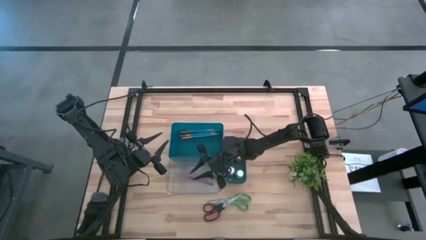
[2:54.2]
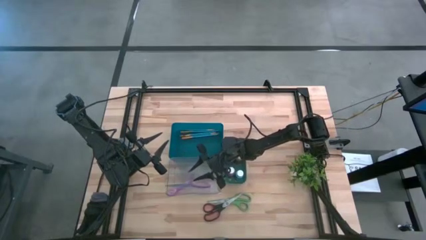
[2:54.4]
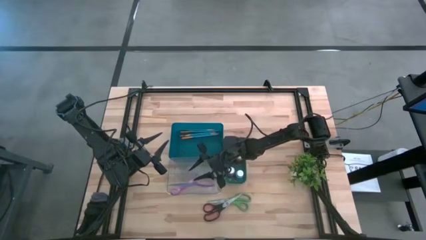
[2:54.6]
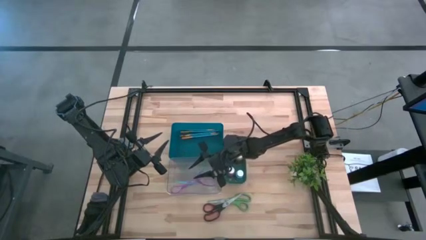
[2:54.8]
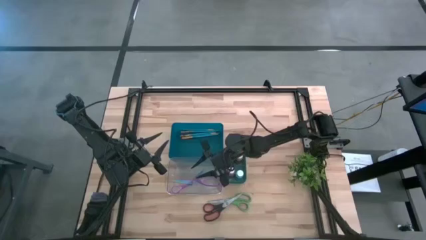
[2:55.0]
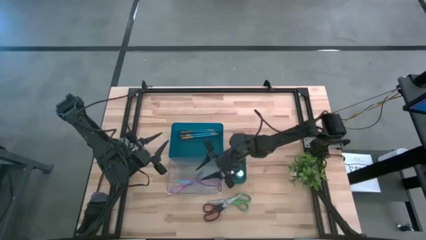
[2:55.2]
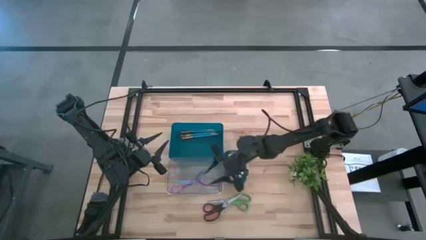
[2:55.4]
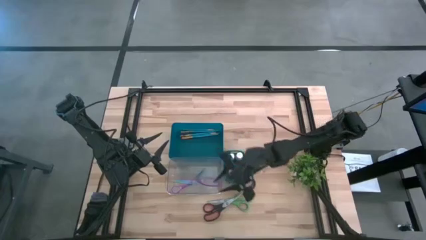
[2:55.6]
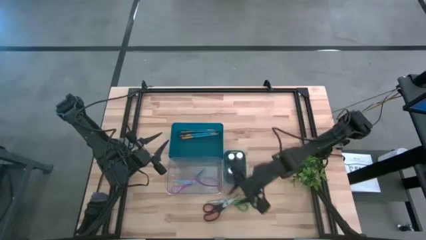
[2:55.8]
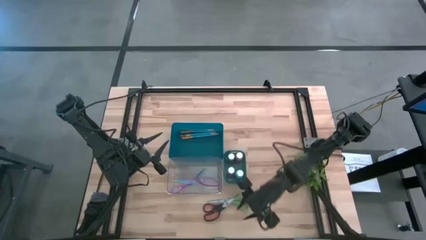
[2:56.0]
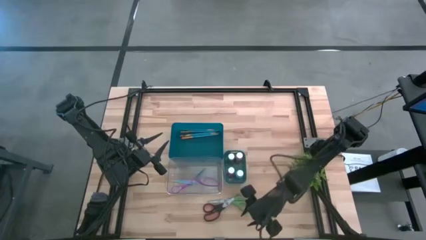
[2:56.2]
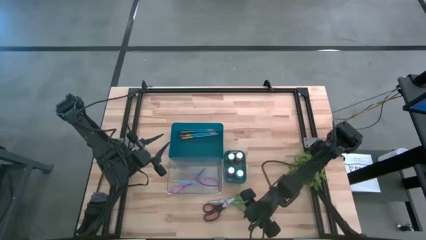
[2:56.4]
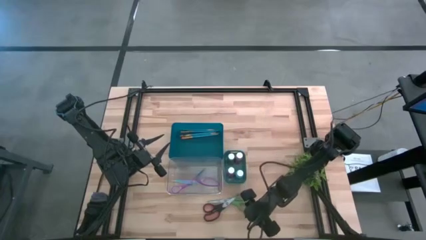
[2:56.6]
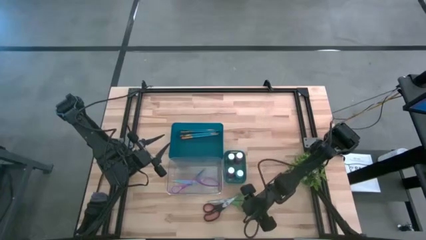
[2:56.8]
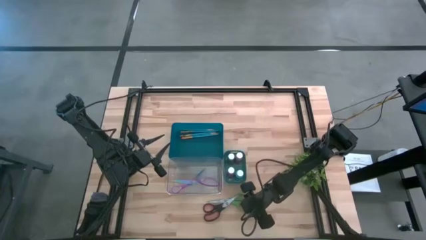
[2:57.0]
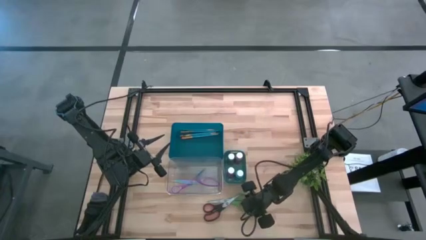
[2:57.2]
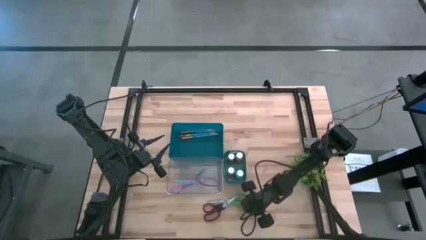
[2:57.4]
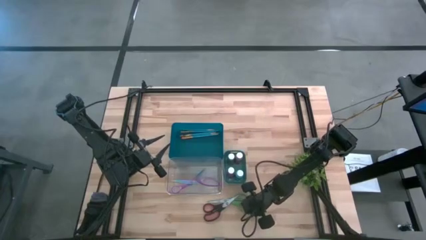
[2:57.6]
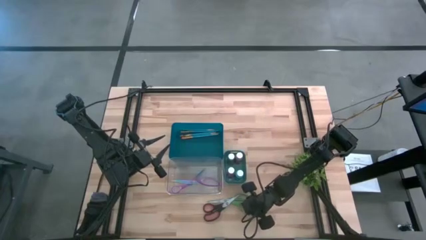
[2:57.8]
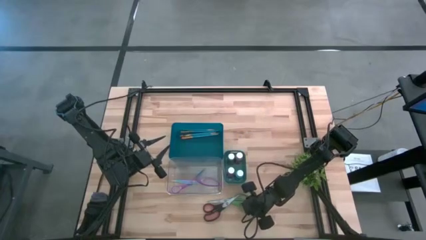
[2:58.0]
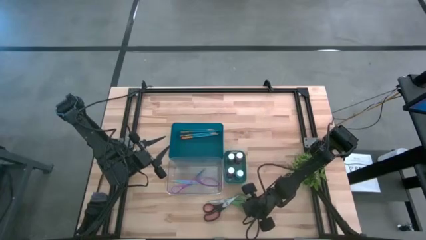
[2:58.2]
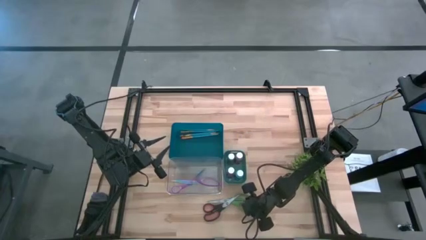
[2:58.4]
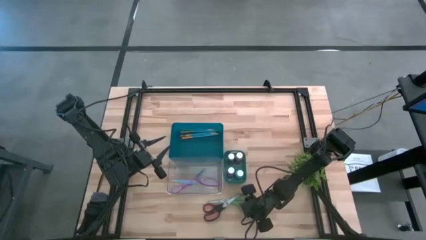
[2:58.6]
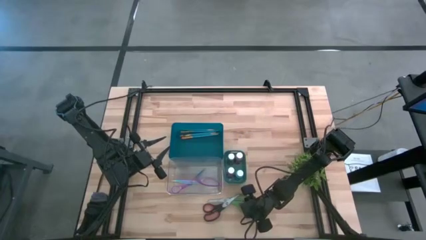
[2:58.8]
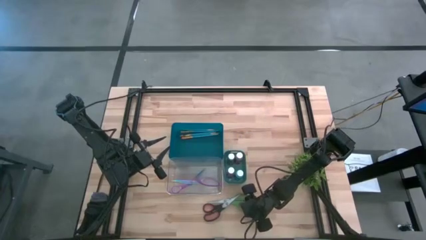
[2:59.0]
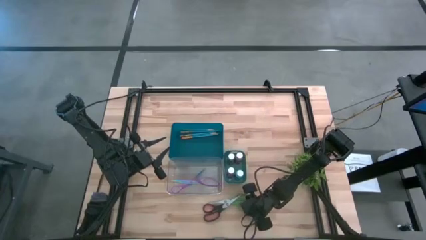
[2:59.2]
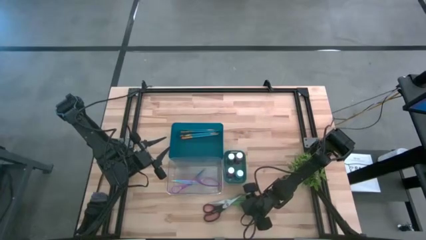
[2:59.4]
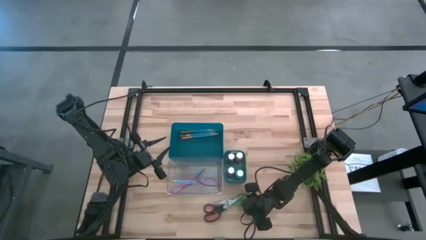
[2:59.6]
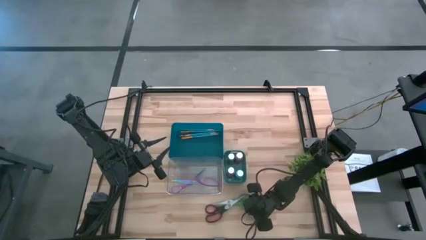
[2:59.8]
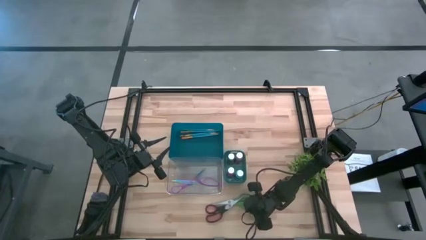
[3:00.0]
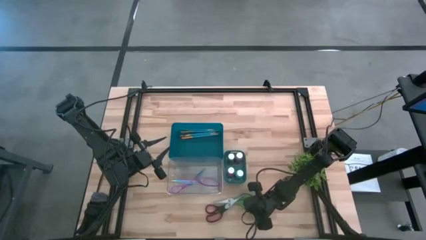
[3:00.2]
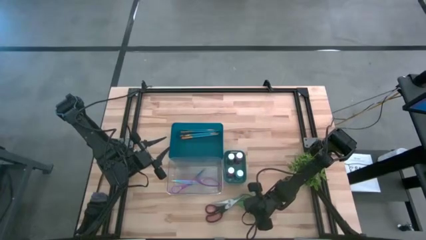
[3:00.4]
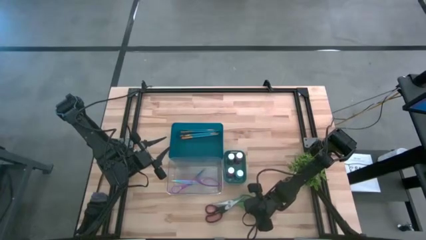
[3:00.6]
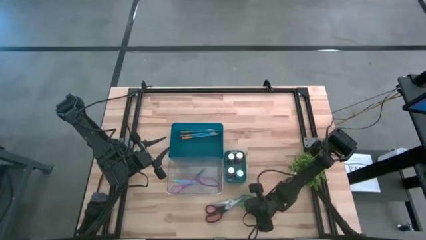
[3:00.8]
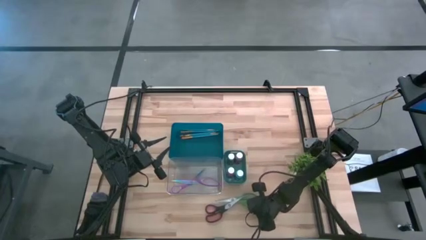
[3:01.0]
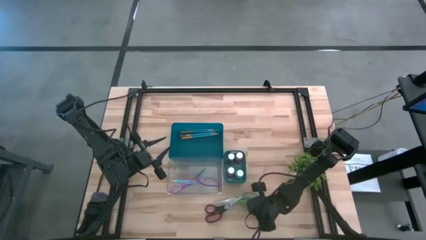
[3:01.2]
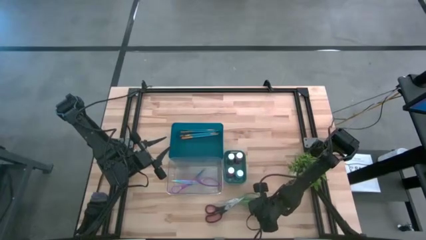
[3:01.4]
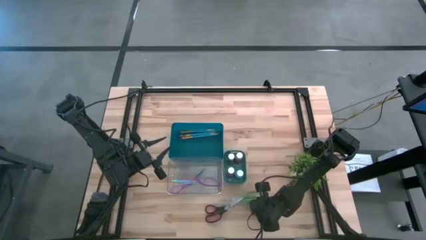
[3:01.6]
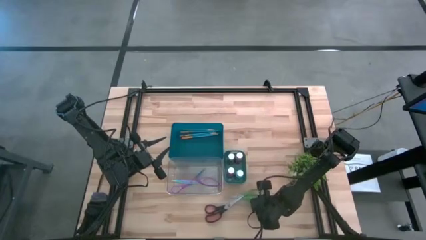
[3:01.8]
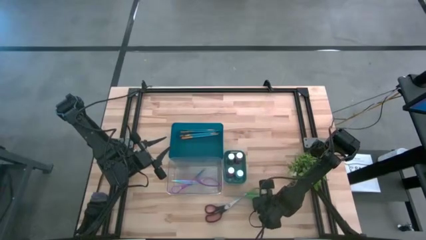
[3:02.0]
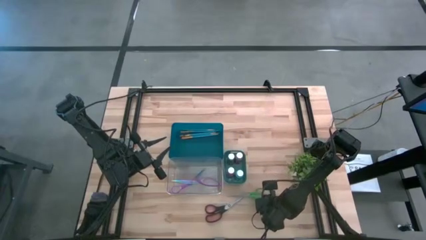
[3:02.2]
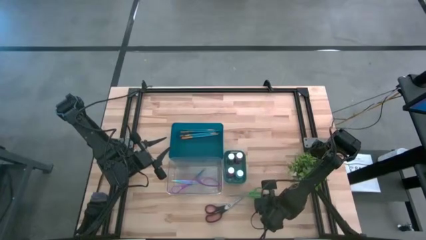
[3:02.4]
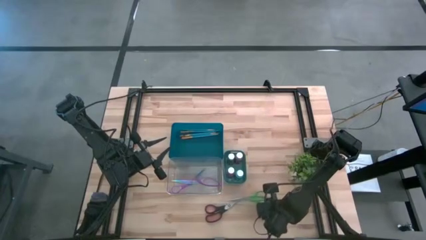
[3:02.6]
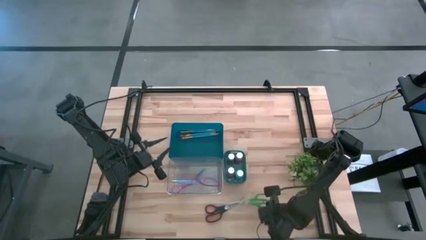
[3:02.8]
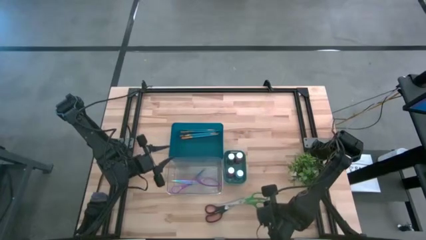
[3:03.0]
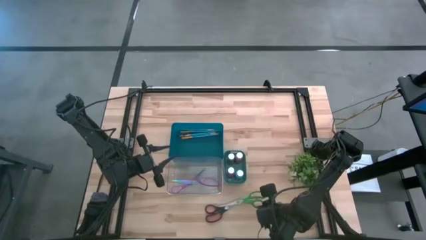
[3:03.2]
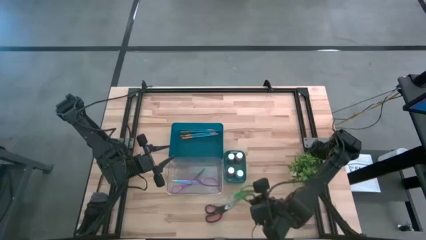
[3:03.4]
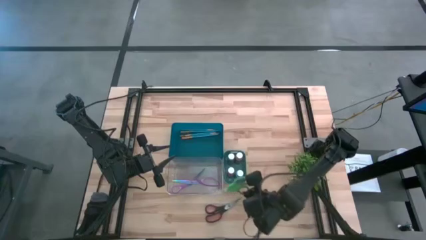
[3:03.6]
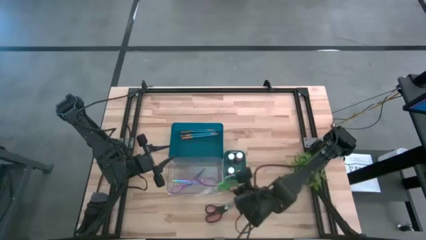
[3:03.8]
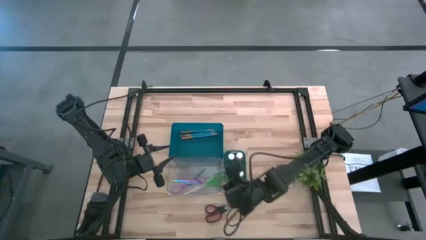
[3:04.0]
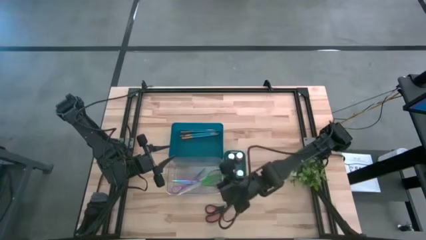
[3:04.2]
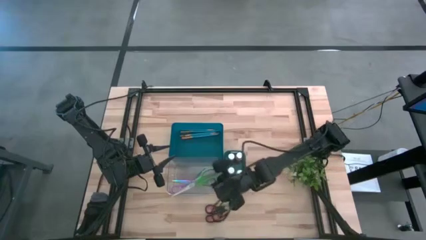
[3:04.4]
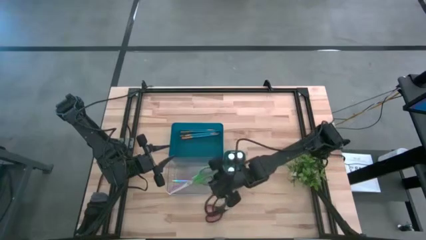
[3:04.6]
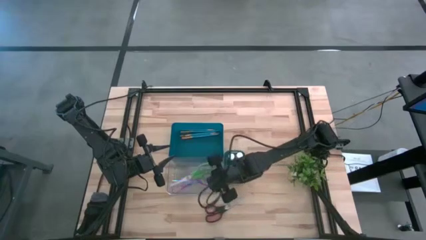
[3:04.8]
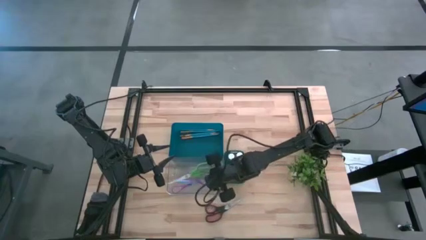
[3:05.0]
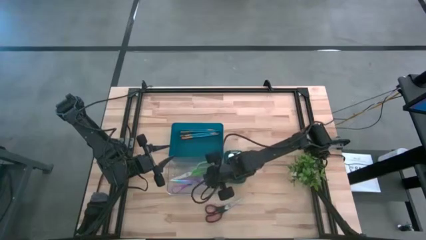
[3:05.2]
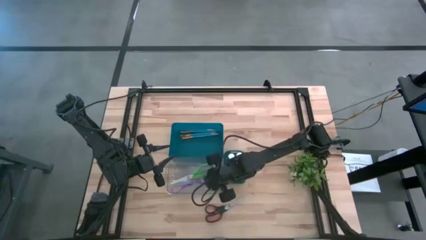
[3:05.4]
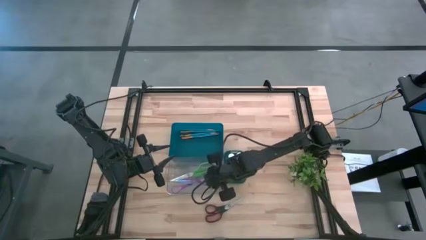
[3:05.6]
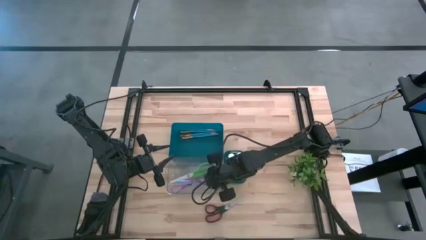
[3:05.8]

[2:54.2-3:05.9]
Task: Pick & Place Paint Supplies
Put the green scissors into the transparent bin

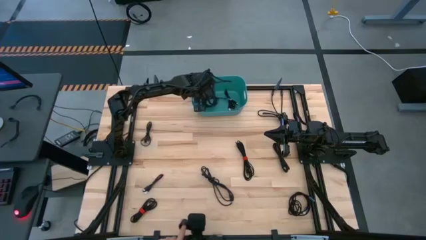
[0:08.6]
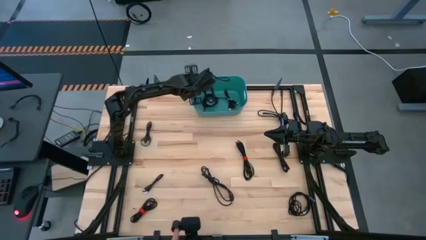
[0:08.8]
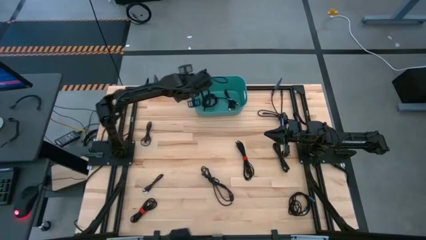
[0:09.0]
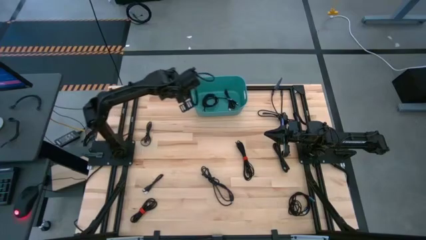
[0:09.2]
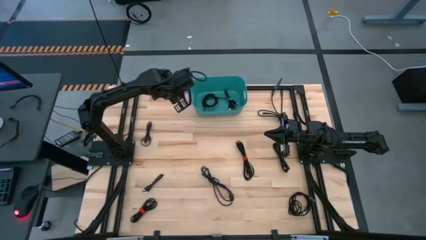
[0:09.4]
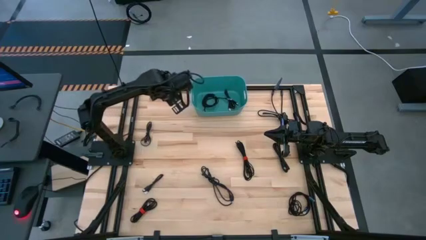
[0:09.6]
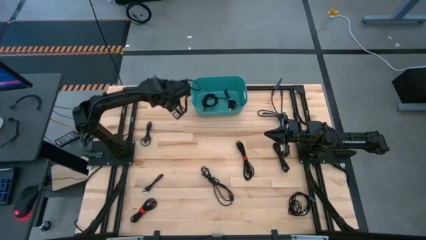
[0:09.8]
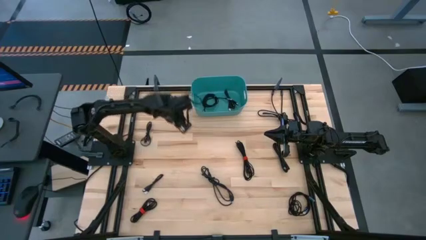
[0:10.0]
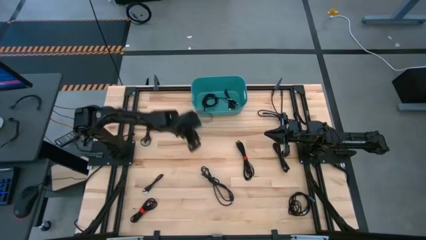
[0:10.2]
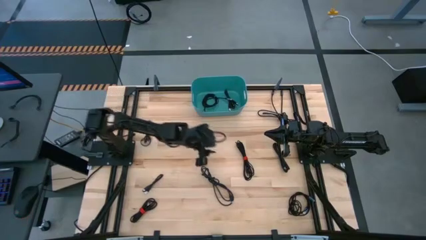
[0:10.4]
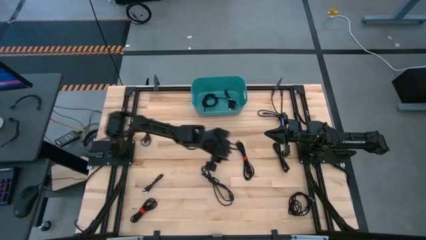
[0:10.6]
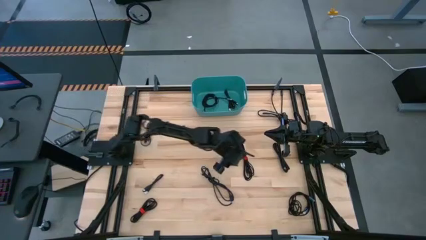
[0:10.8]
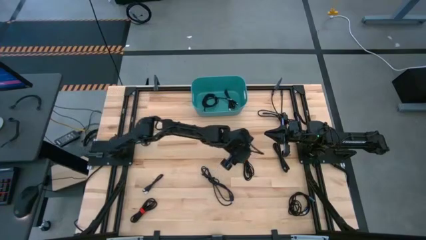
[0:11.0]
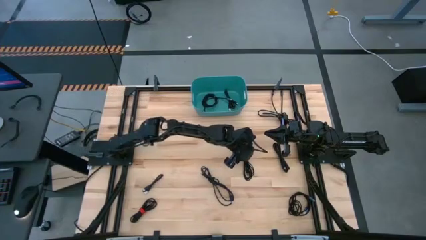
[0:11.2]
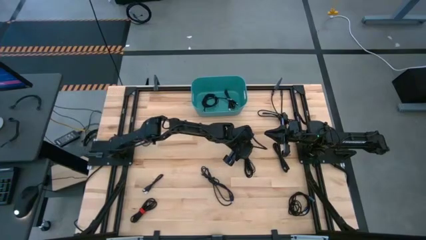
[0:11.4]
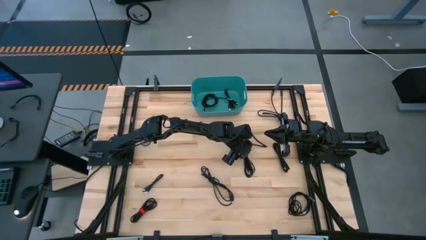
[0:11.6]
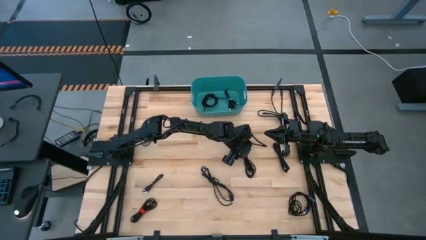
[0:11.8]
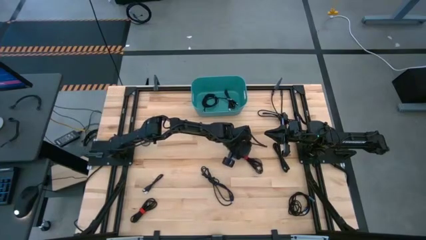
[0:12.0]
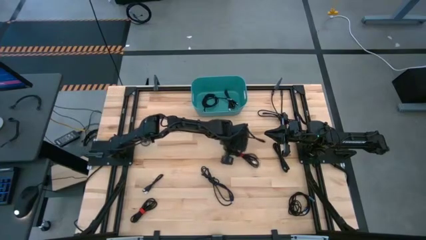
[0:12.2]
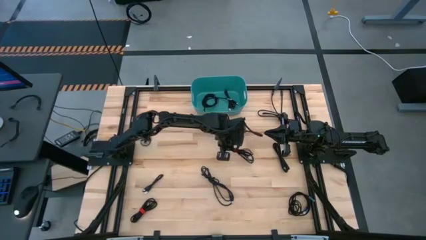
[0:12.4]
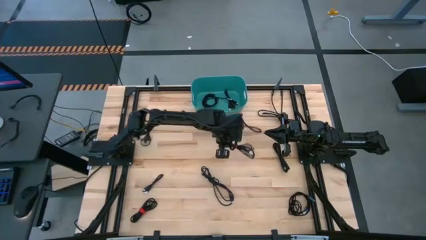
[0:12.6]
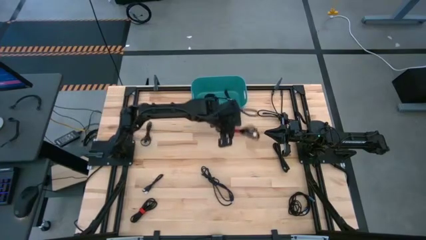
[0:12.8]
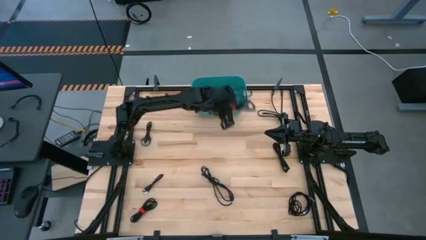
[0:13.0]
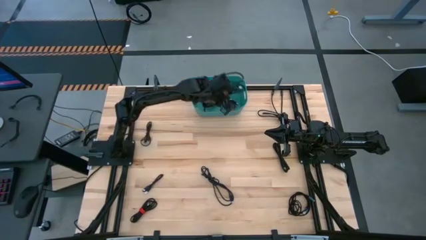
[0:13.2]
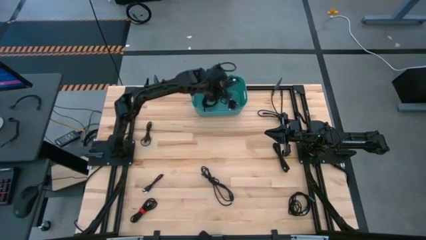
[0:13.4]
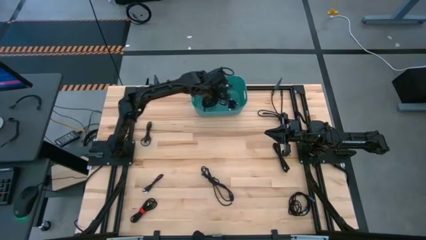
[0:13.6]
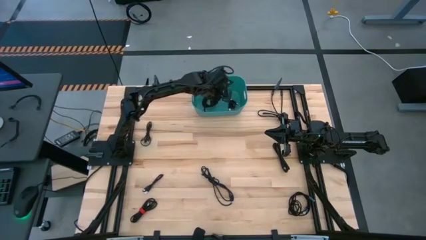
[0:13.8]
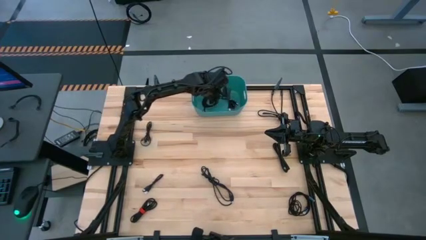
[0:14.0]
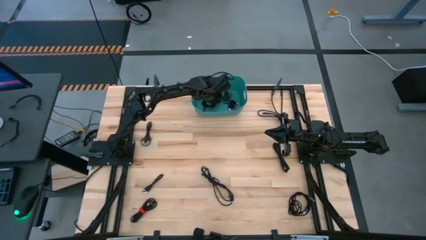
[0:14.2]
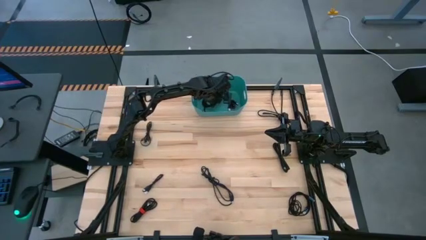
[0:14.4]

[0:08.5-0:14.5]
Task: Pick and place USB-C Cables
Put the black charger cable into the blue bin
